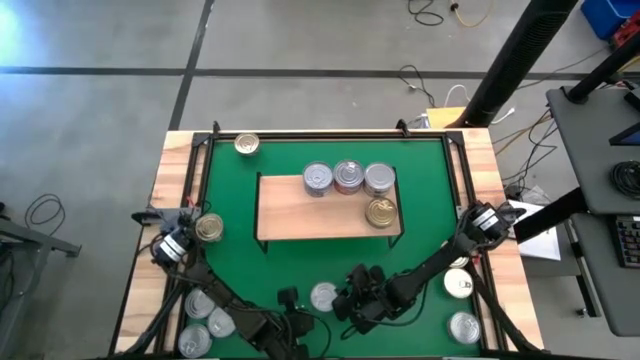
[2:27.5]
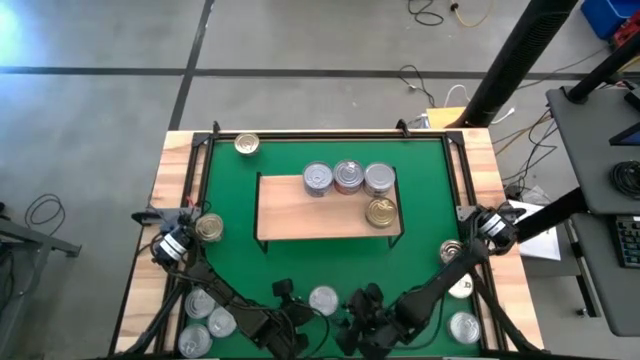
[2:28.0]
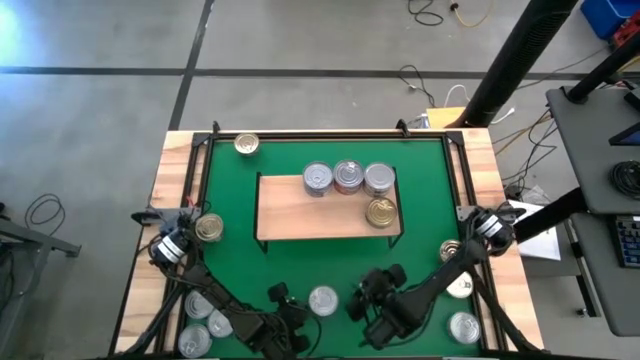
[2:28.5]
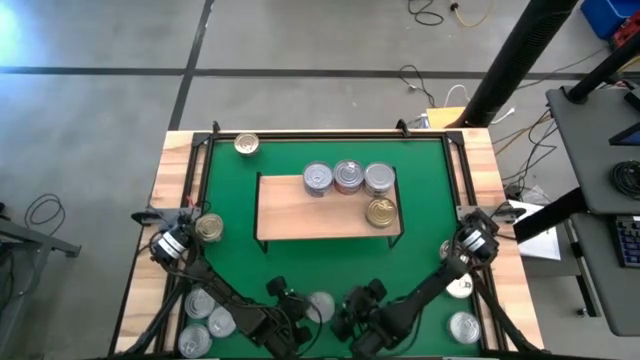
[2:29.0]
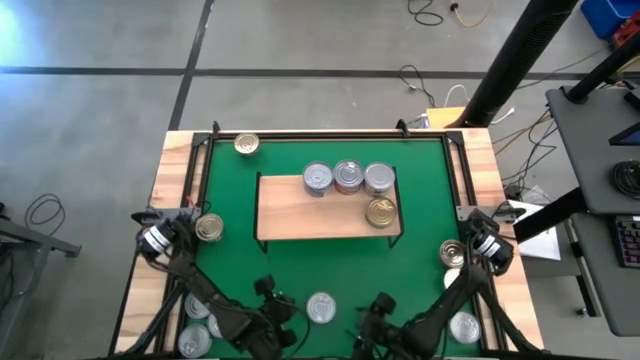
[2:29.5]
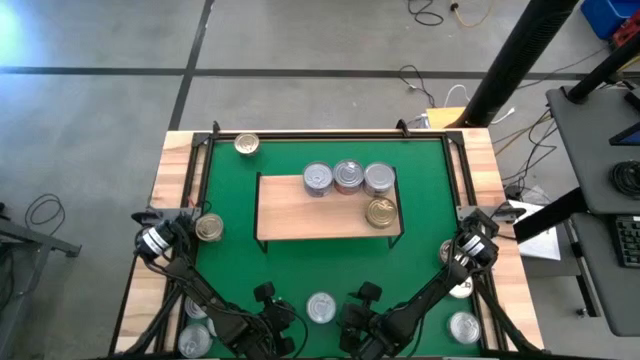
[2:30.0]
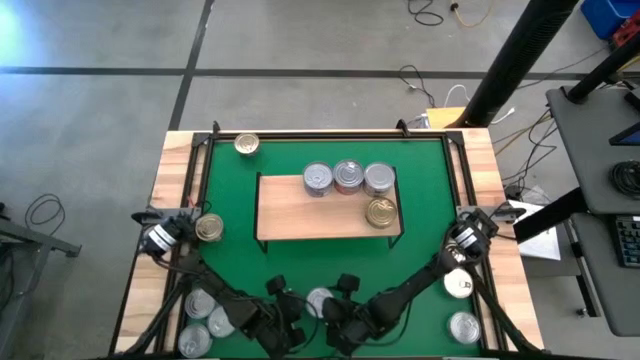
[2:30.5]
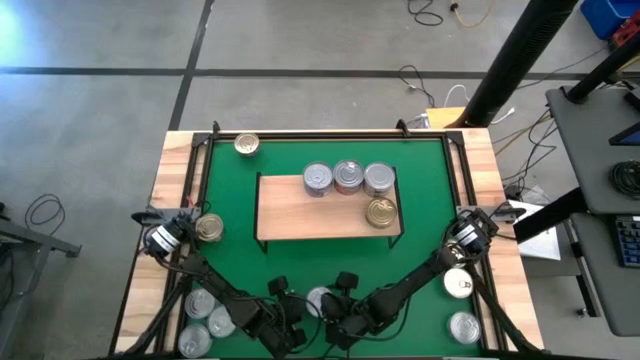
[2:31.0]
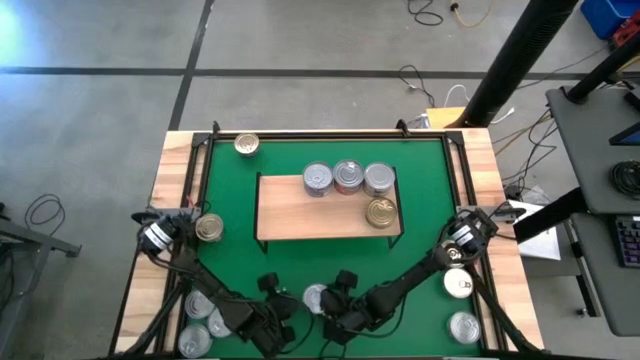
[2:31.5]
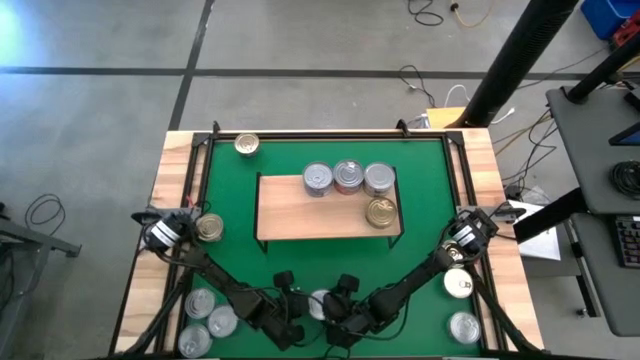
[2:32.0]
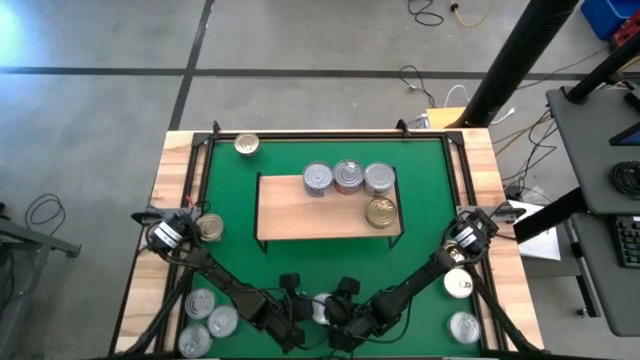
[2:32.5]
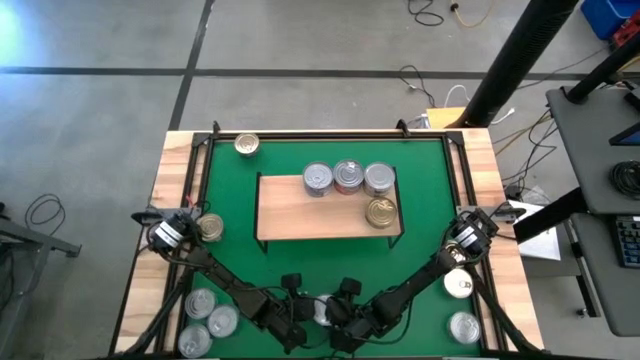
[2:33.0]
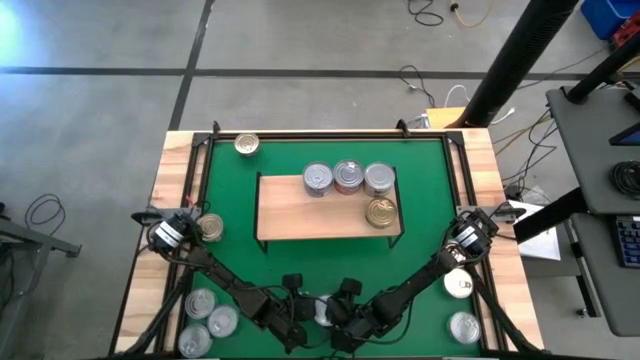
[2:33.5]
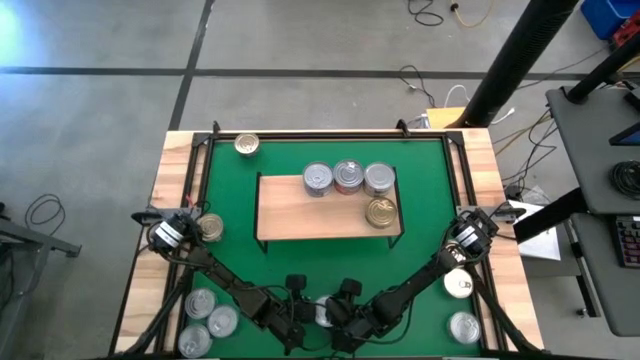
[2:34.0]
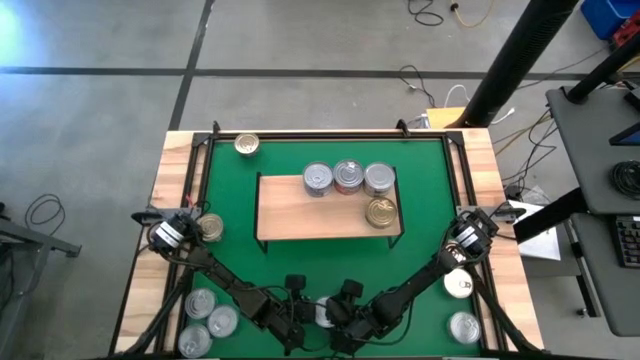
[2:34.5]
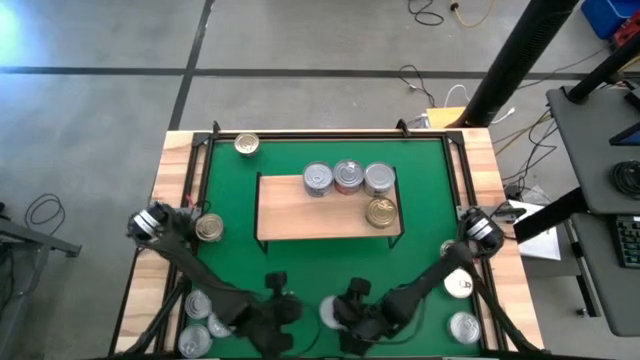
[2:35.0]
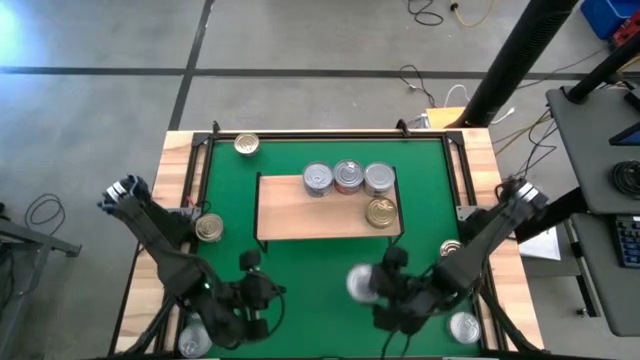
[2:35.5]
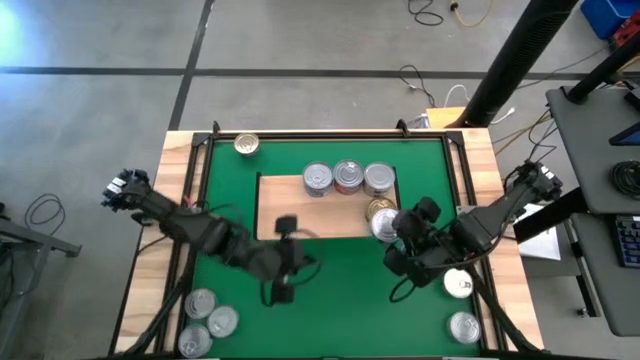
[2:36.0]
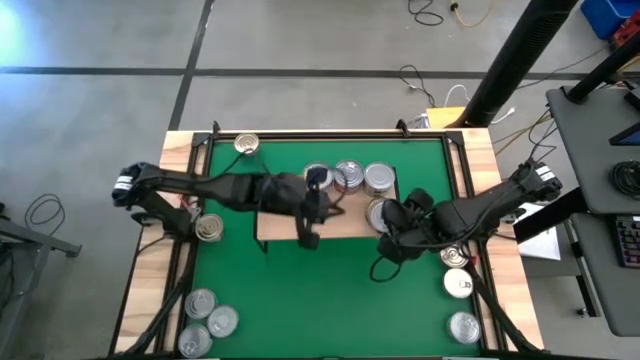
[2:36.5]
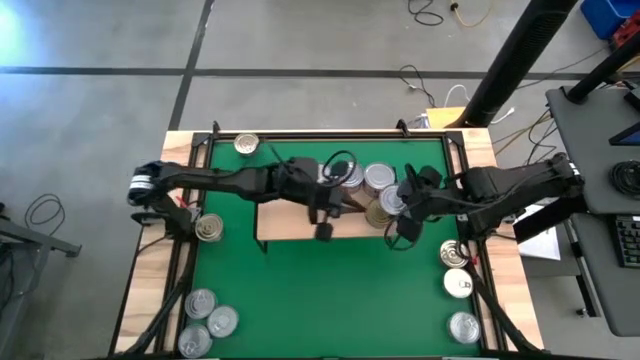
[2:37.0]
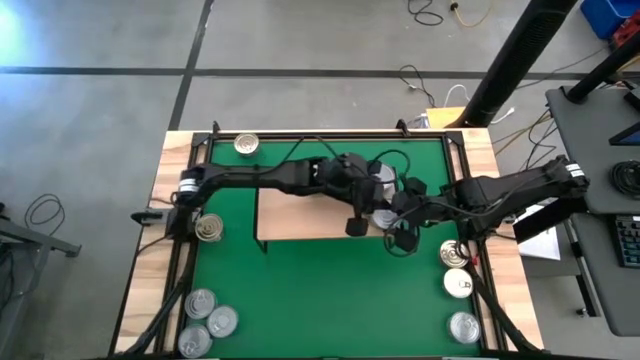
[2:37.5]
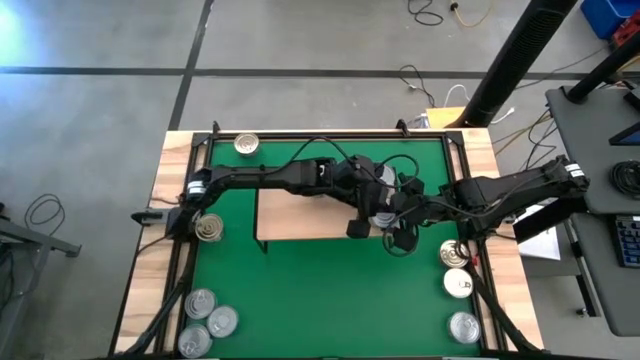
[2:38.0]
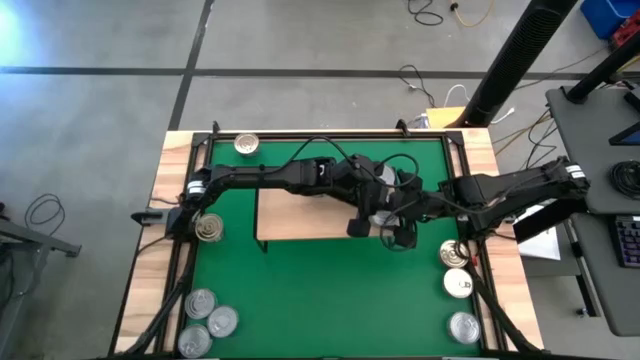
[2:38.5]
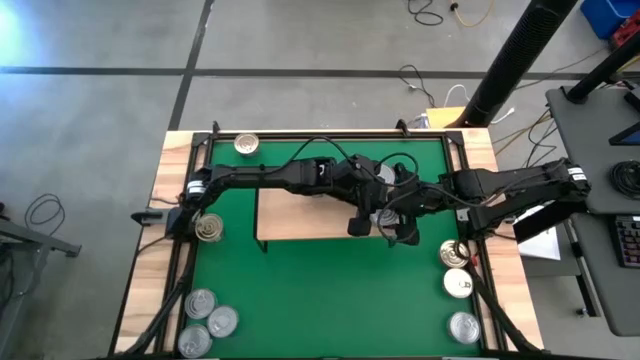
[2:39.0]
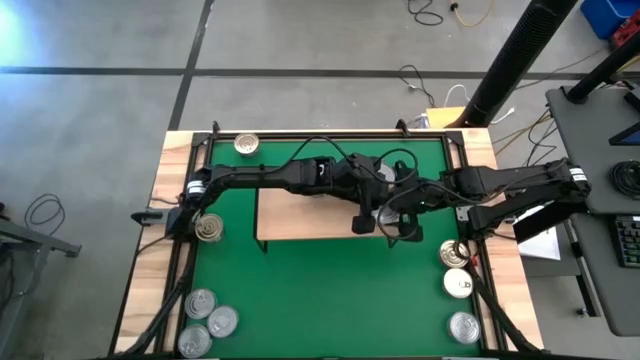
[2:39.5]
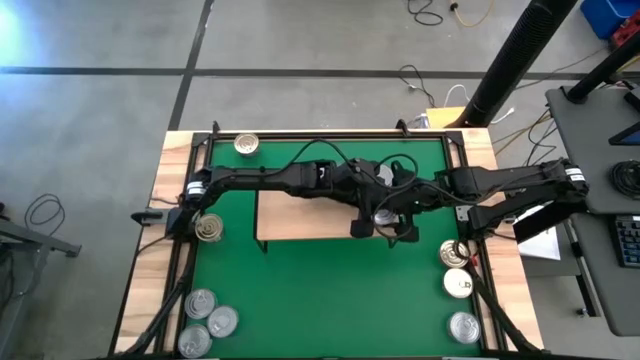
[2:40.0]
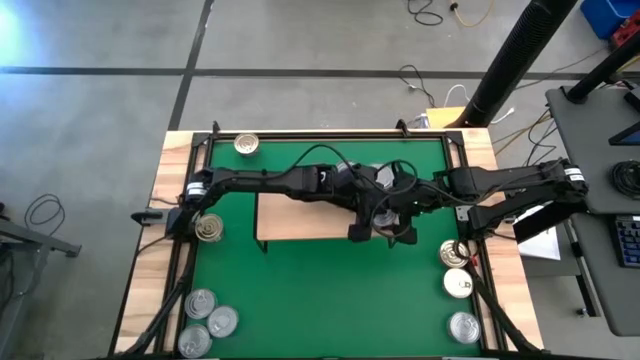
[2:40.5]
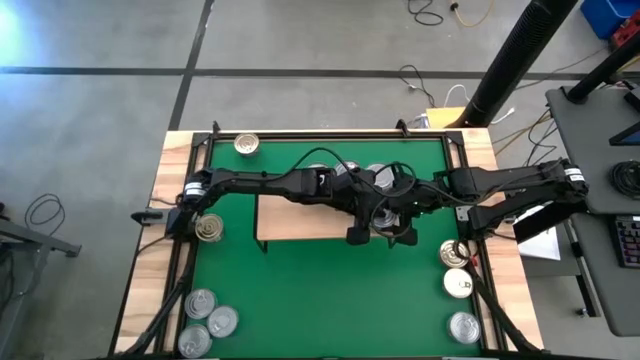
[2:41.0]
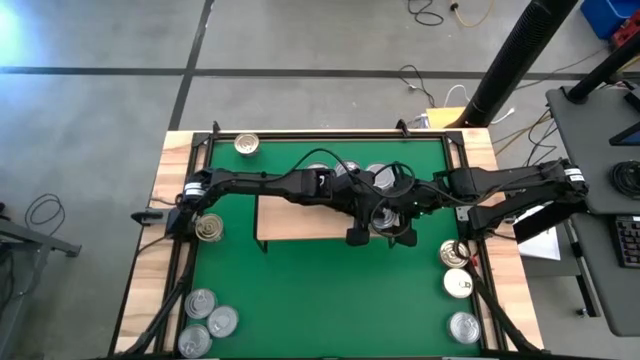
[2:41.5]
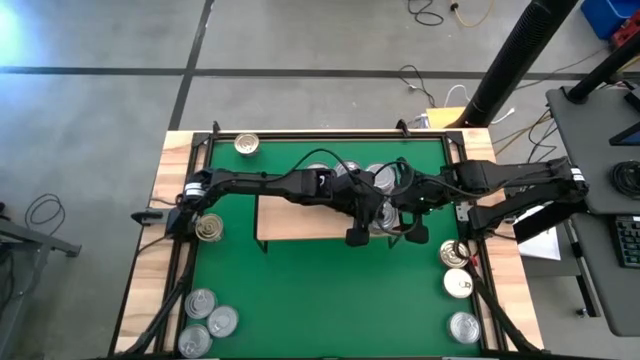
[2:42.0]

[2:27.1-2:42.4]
Task: Stack canned seafood by type on shelf
Stack the green tuna can on top of the green tuna can on the shelf
